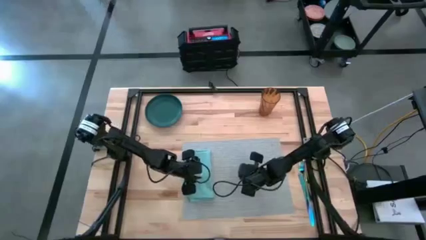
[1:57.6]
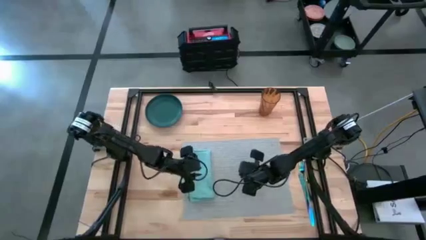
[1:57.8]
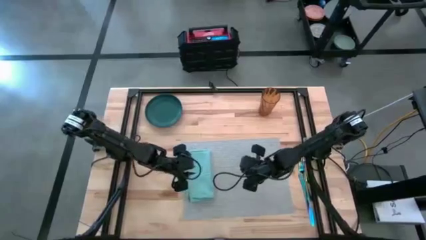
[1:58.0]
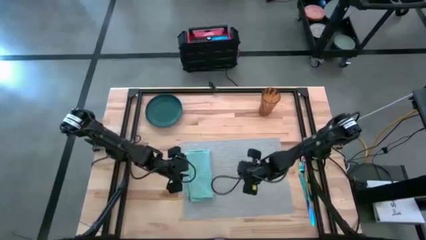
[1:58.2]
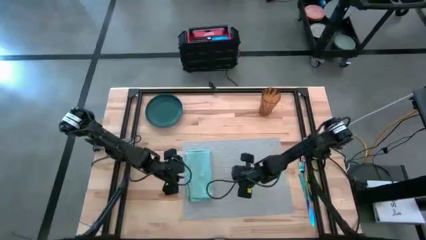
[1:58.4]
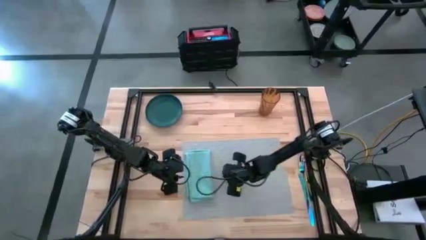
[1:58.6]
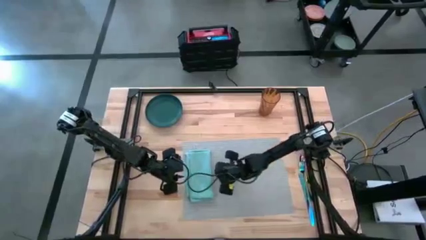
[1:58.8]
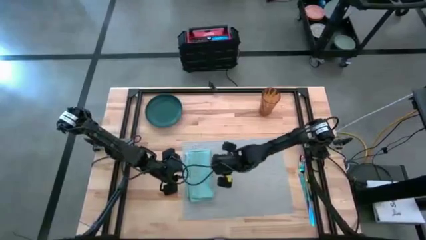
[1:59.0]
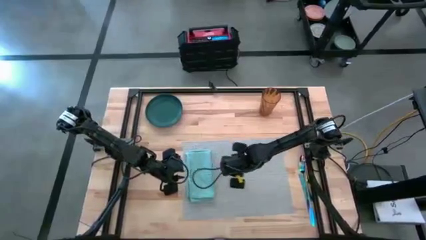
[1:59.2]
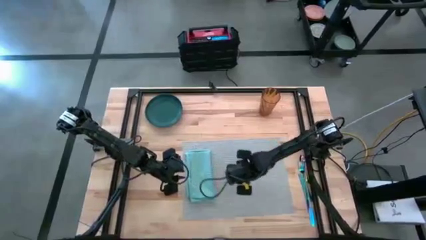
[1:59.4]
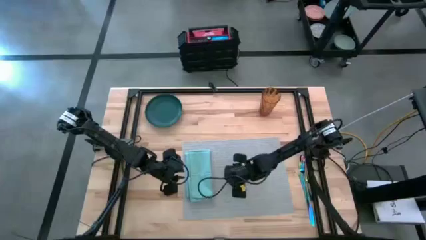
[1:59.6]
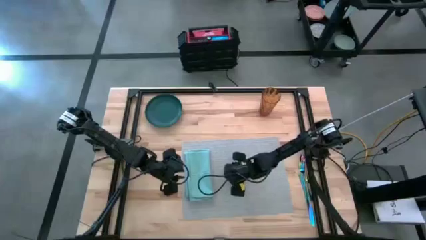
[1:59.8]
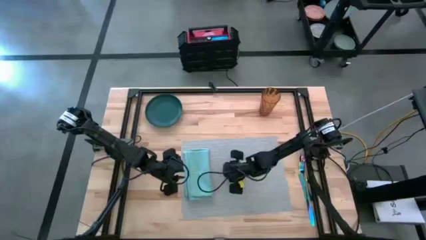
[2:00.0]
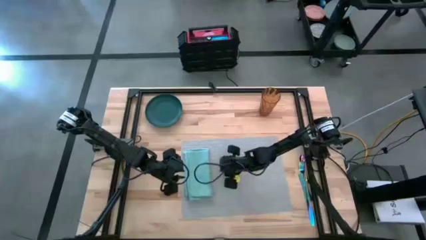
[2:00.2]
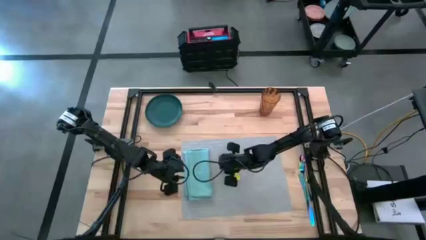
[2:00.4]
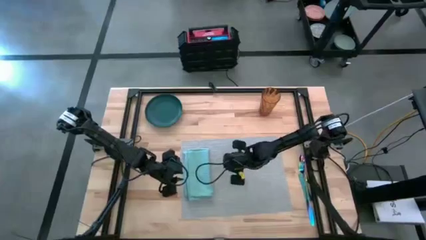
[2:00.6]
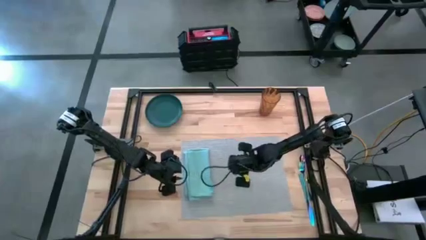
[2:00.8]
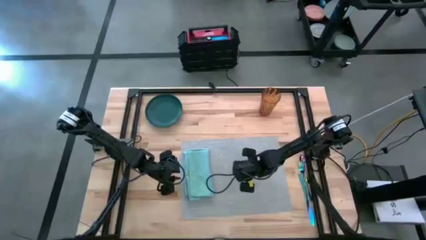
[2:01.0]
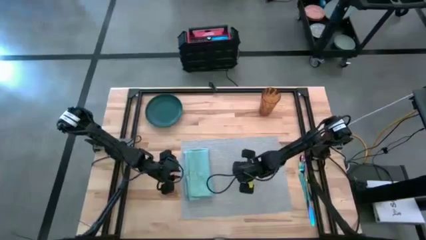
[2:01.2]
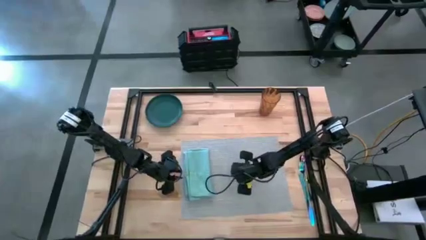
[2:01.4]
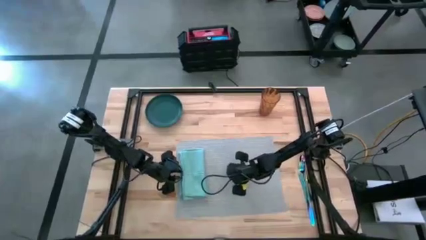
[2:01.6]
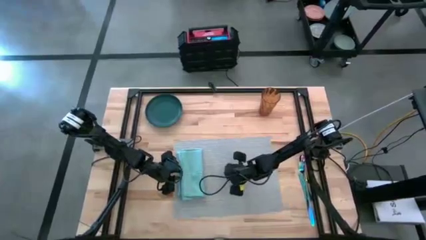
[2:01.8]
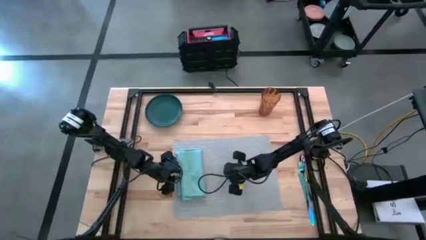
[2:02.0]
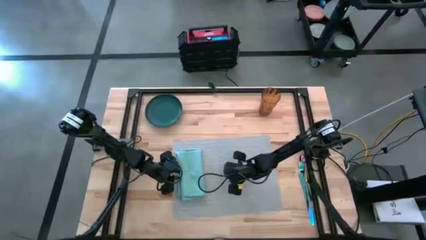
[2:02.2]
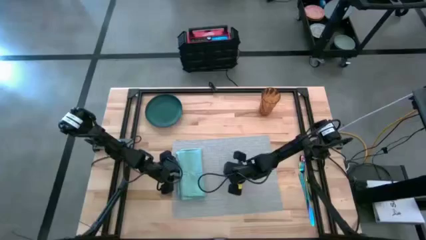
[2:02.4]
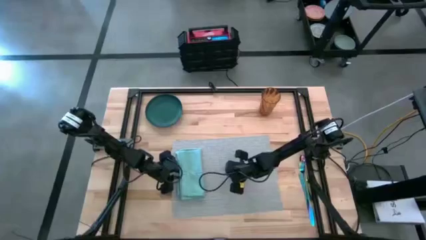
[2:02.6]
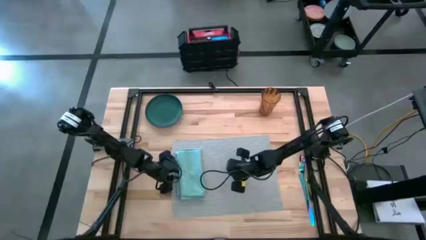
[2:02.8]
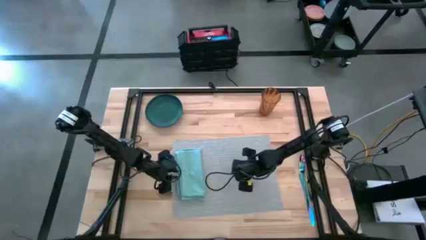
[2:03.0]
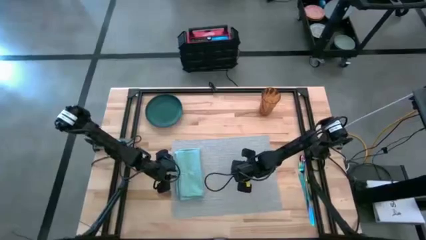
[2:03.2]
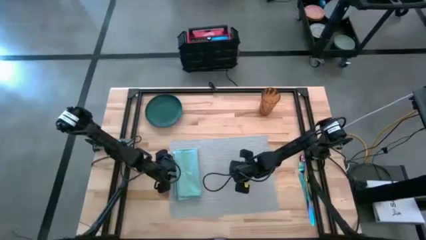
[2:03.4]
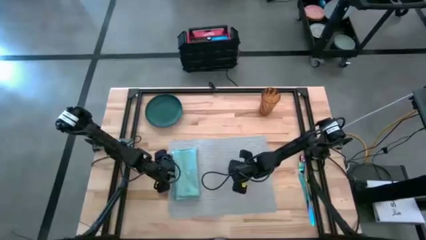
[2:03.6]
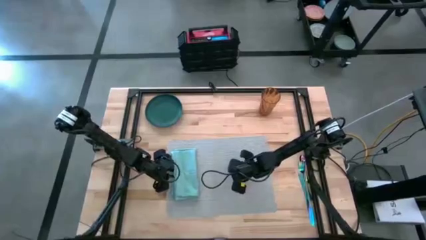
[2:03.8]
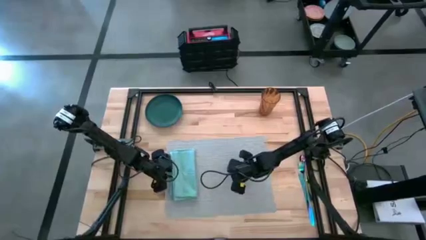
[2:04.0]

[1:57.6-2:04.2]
Task: Set table place
Adjust the gray tablemat

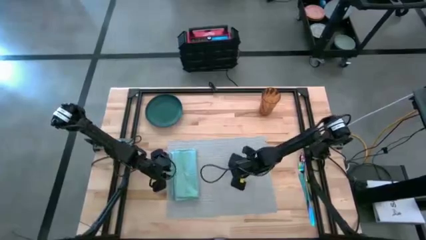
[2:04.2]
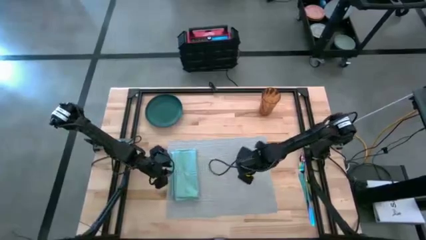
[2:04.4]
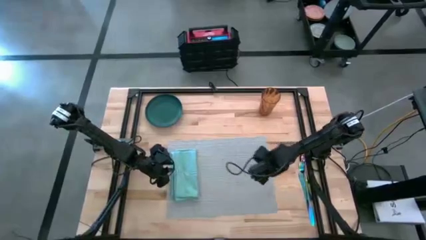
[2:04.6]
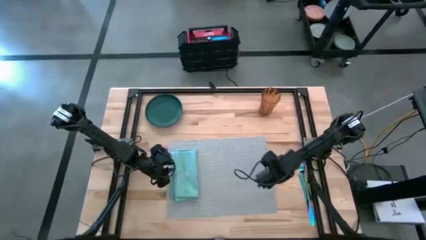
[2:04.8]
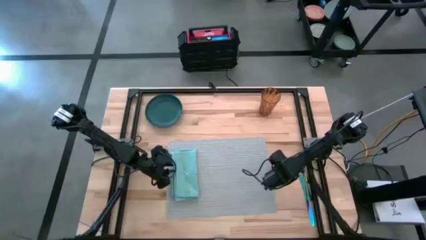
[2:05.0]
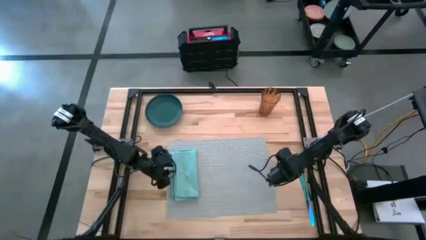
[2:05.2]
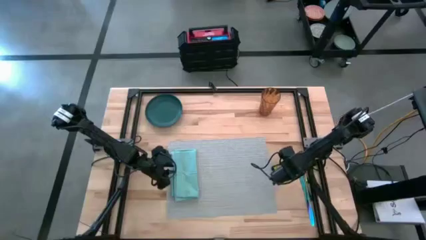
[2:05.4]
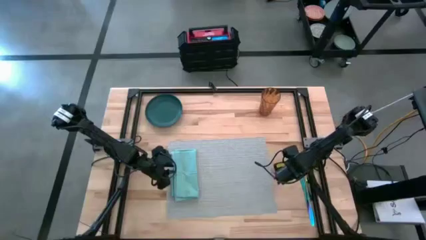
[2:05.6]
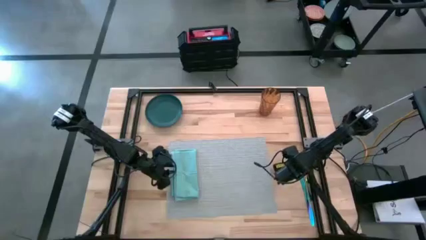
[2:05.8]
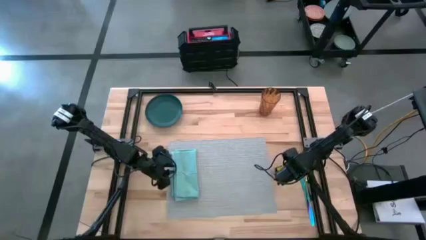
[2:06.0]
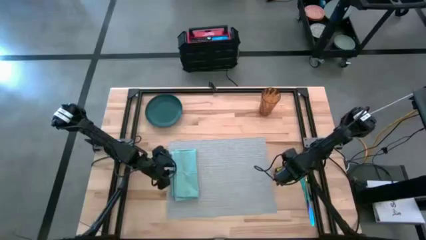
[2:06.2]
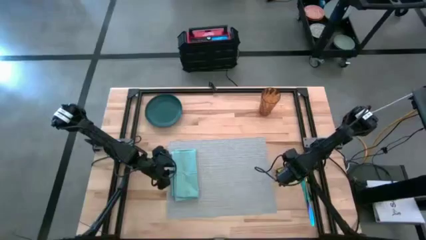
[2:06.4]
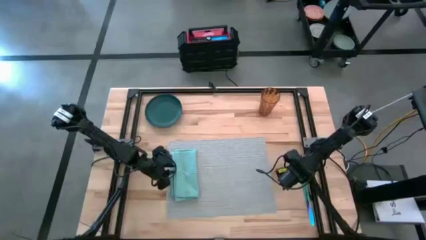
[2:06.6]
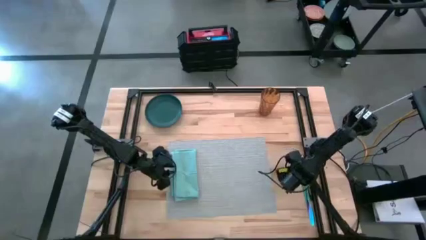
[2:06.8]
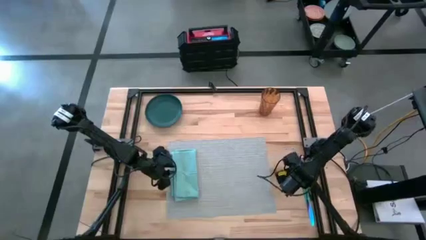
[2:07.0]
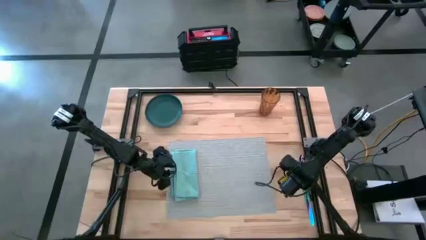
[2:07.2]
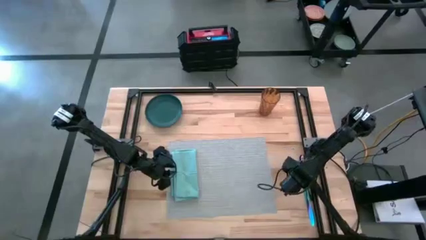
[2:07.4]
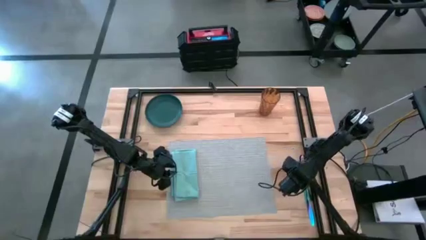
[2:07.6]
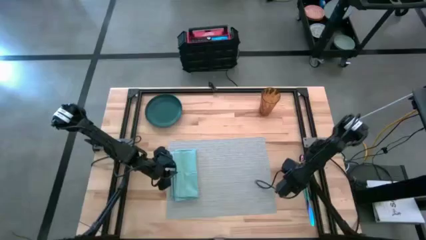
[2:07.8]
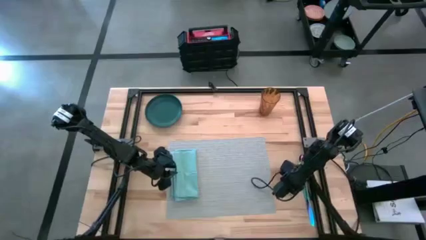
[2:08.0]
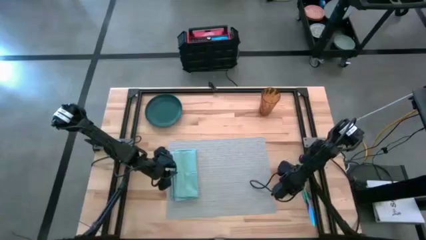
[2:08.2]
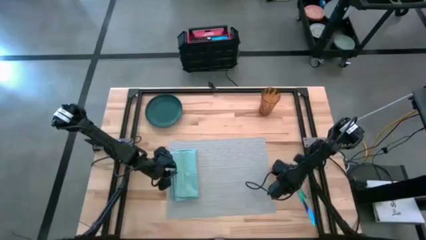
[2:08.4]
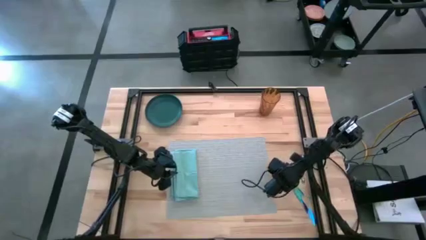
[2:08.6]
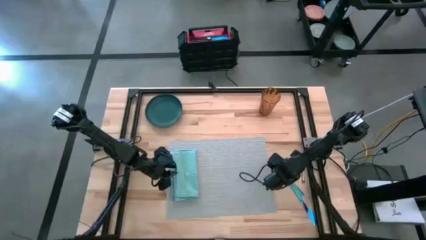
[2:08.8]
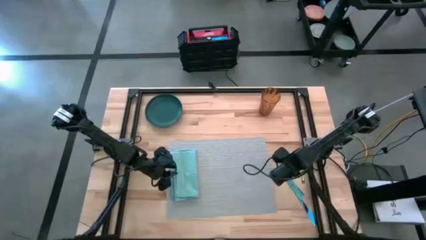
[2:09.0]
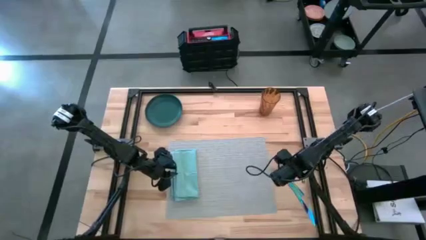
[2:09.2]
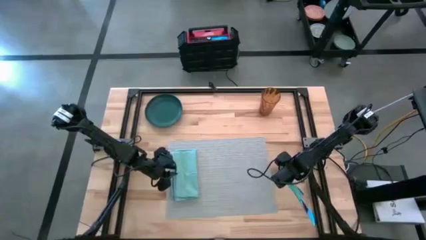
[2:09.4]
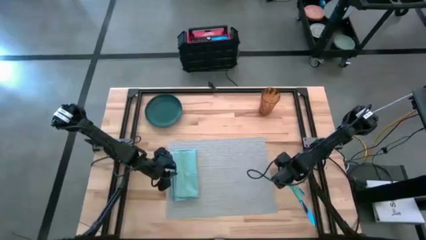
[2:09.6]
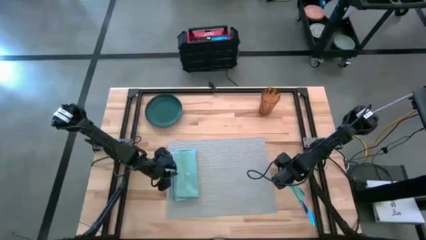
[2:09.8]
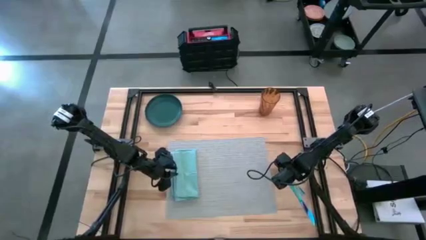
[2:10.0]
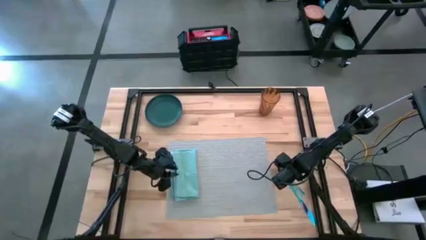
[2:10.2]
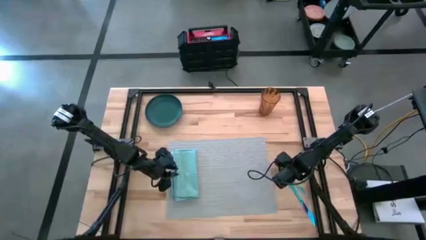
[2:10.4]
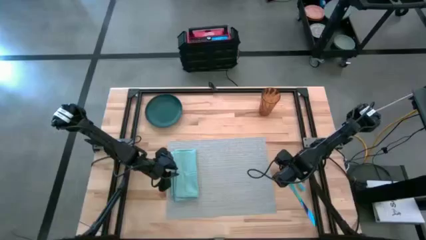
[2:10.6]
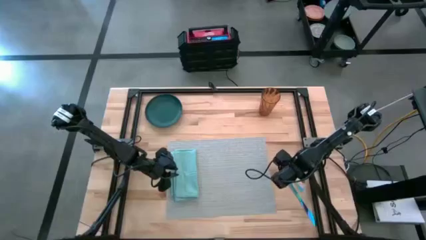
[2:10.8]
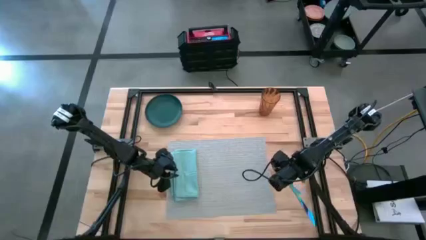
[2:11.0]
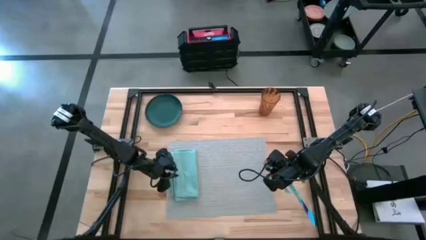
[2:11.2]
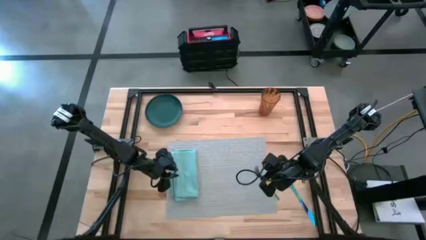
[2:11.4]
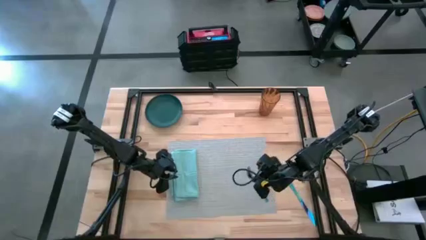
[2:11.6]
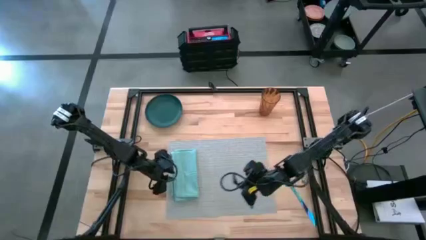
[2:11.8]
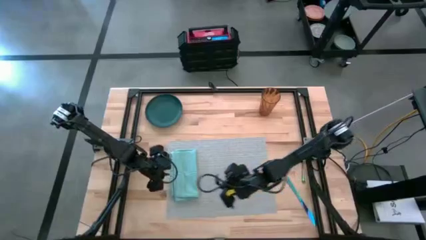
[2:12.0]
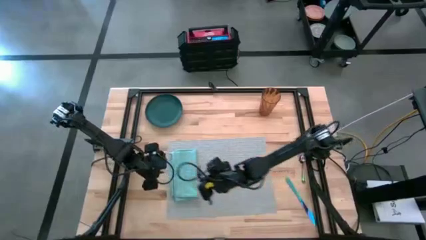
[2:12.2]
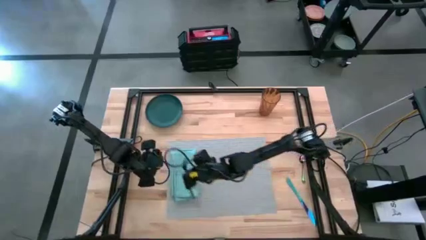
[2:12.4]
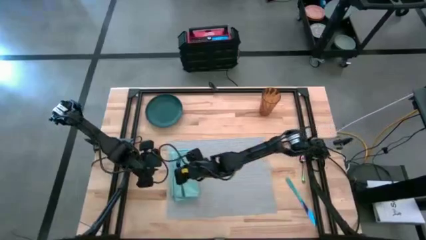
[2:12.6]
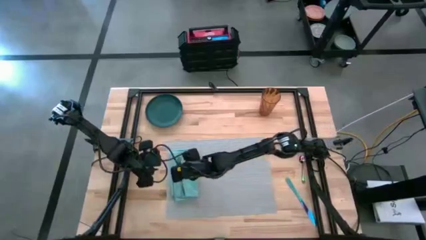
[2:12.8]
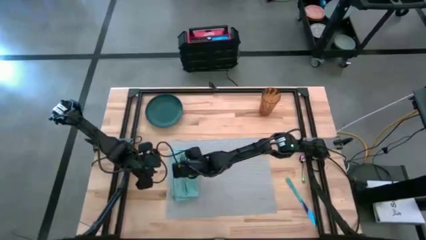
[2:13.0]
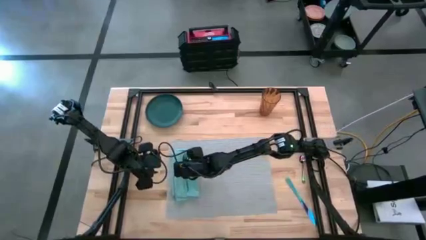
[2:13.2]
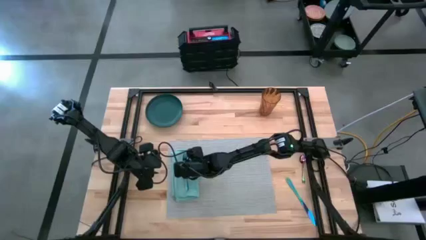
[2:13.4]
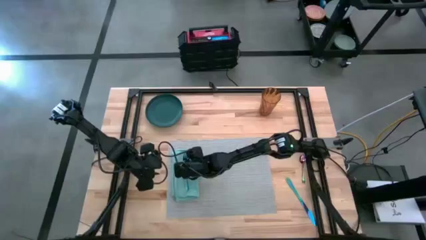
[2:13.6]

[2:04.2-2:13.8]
Put the blue fork on the light blue table napkin

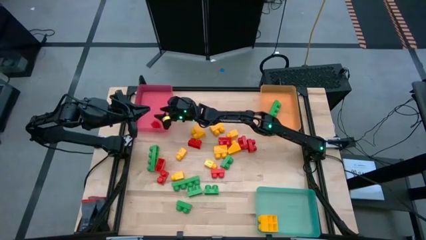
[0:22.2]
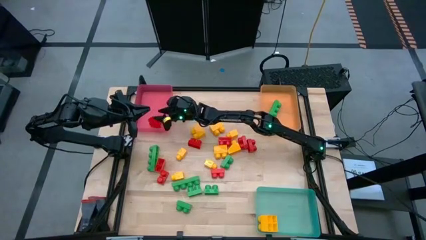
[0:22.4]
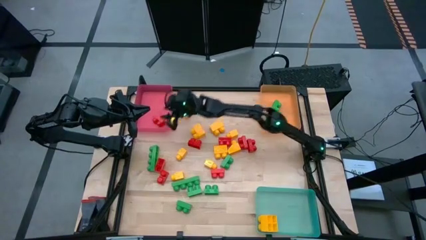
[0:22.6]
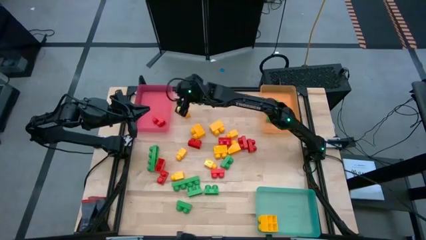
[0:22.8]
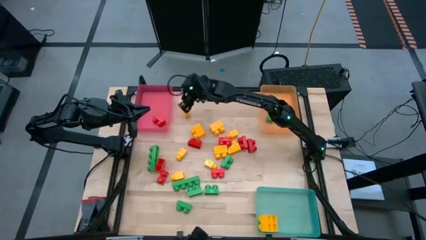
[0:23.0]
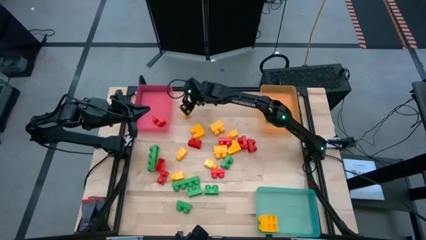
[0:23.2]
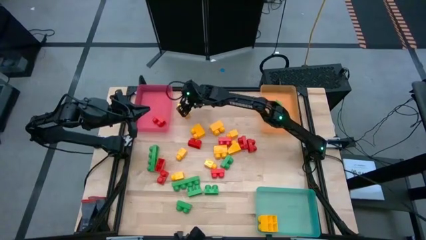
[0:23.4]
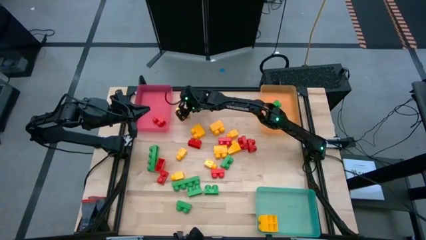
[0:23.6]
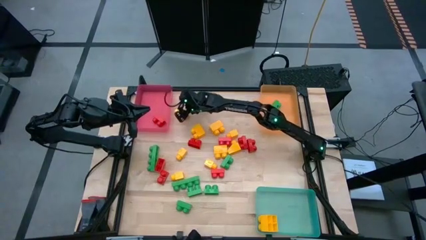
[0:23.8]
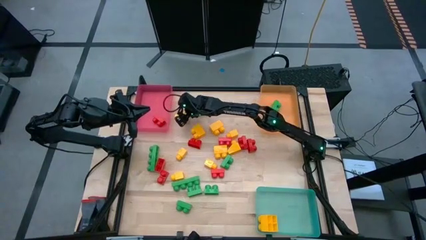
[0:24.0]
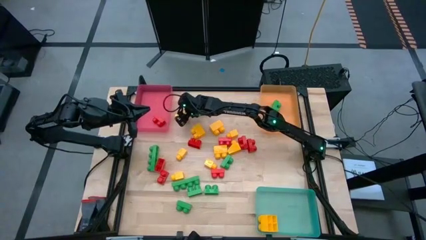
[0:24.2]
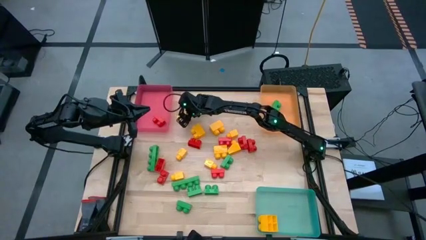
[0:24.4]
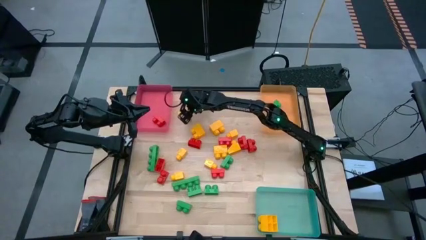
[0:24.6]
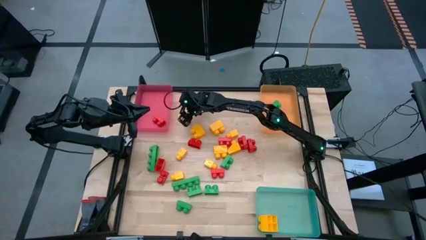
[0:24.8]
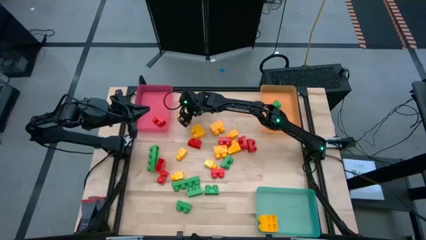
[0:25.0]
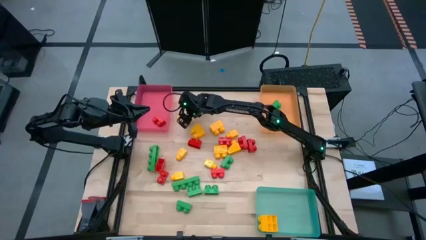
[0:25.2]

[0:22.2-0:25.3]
Task: Sort blocks
Put the yellow game piece into the blue bin
